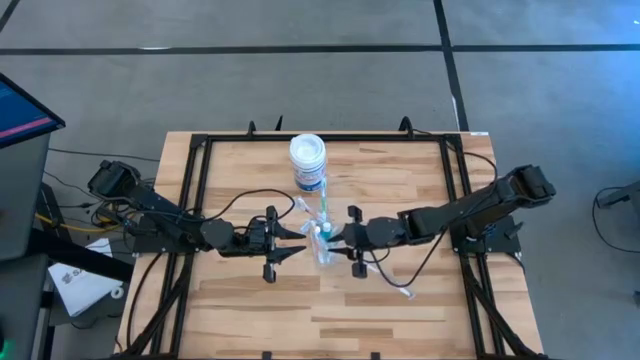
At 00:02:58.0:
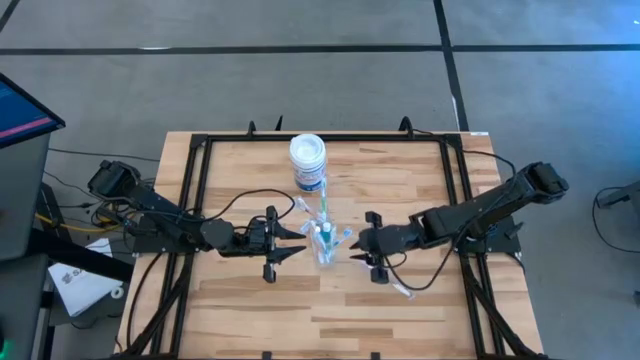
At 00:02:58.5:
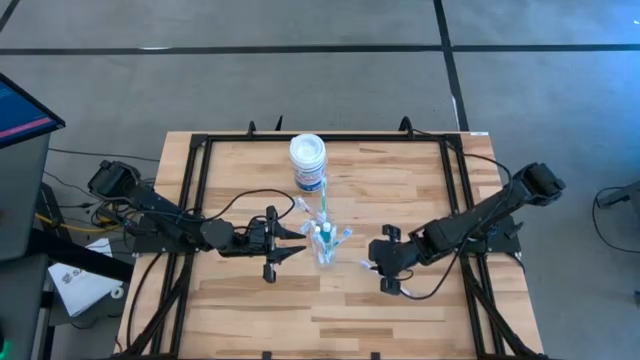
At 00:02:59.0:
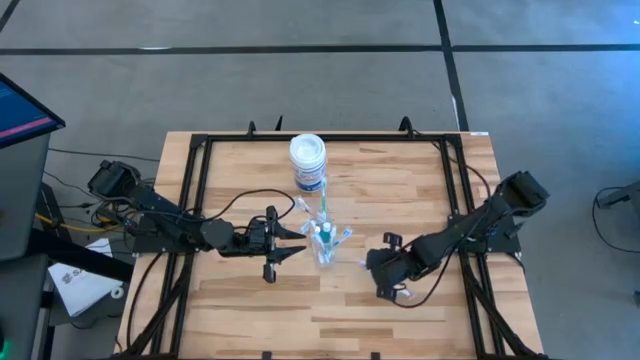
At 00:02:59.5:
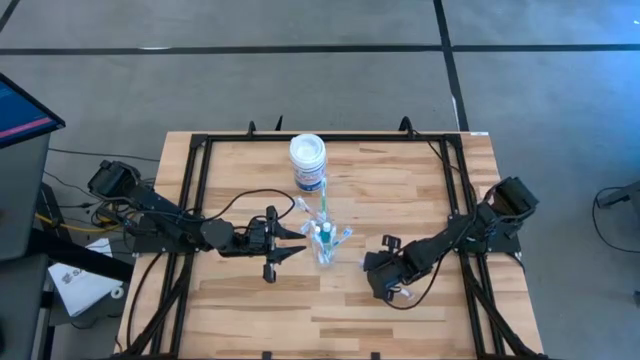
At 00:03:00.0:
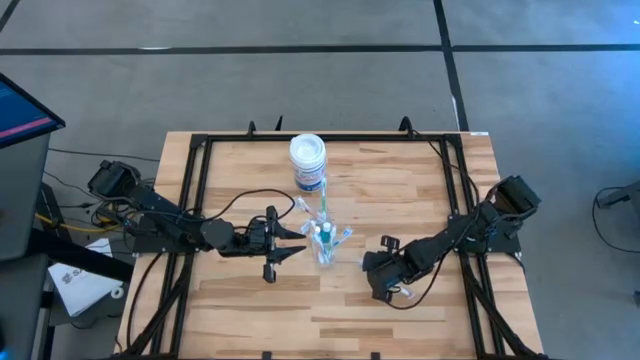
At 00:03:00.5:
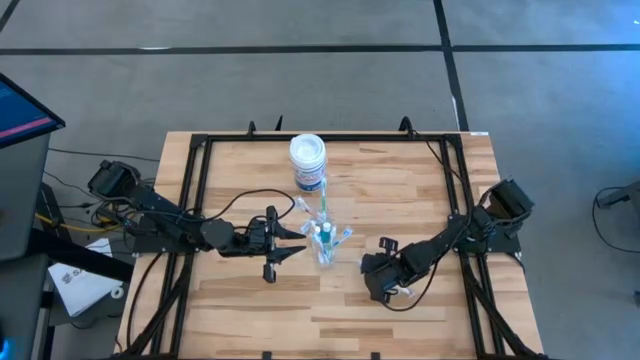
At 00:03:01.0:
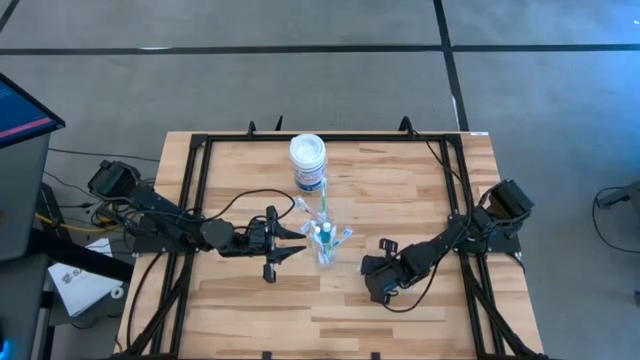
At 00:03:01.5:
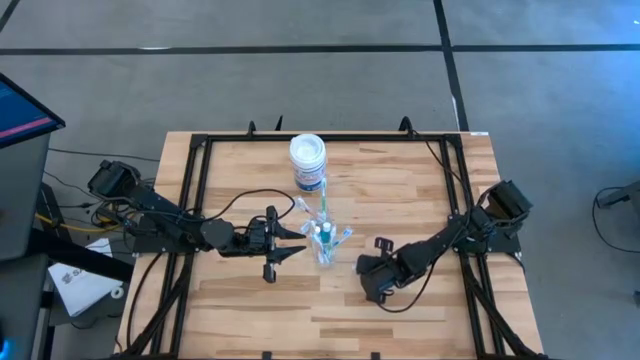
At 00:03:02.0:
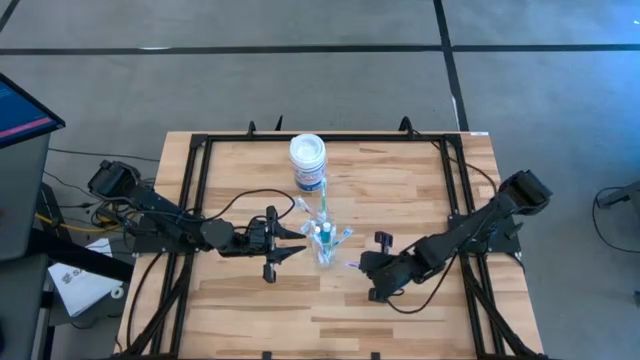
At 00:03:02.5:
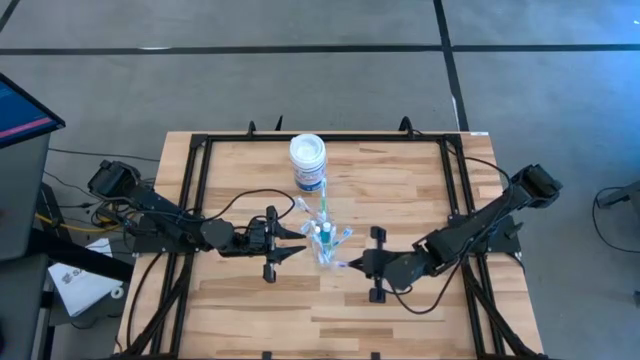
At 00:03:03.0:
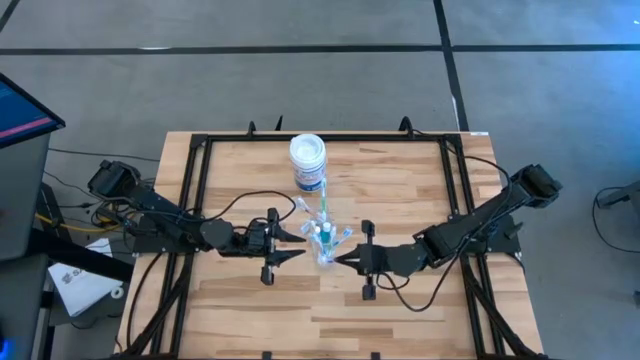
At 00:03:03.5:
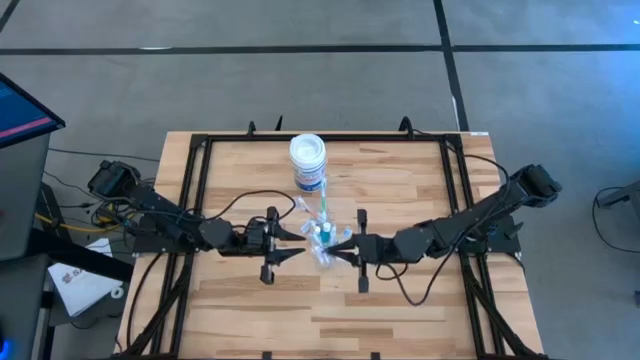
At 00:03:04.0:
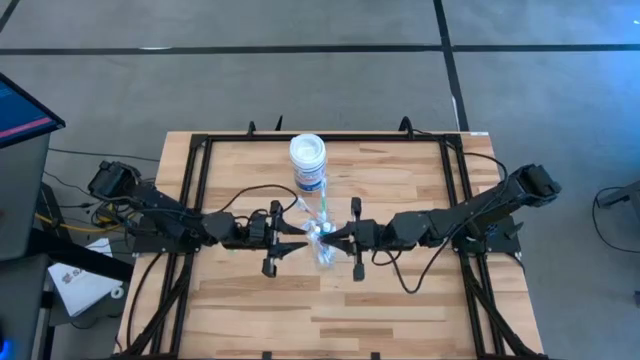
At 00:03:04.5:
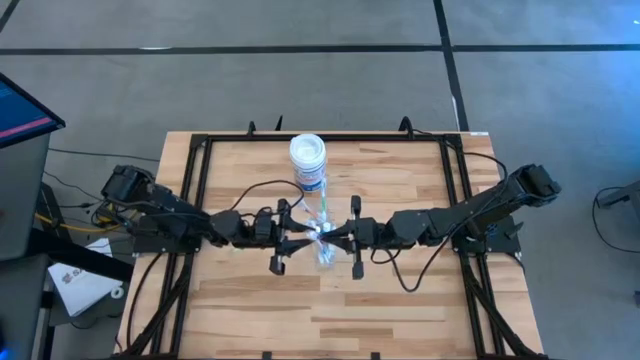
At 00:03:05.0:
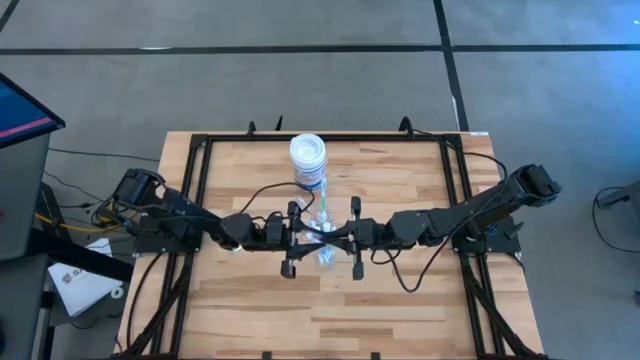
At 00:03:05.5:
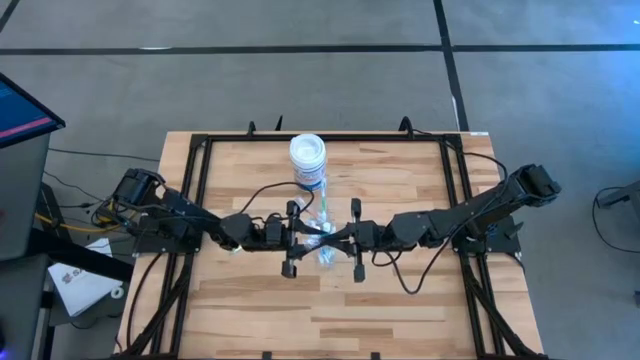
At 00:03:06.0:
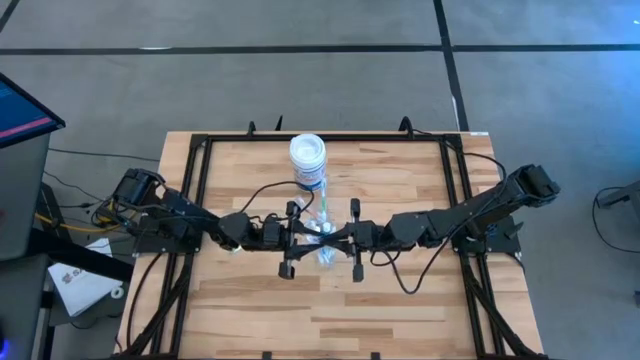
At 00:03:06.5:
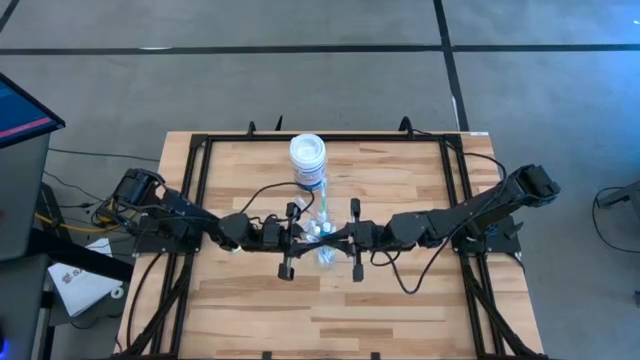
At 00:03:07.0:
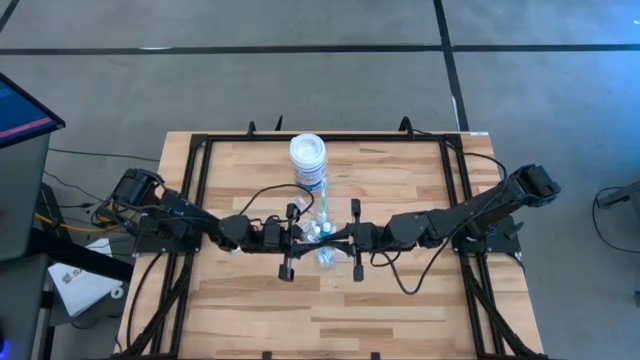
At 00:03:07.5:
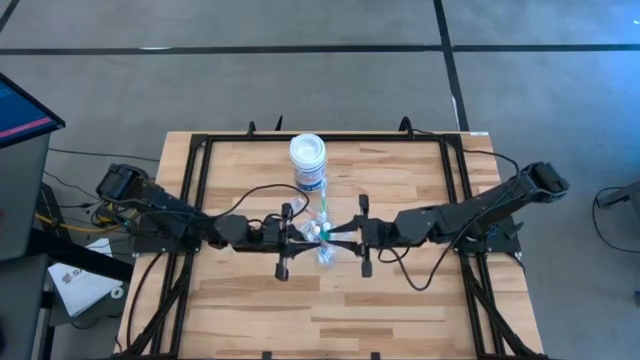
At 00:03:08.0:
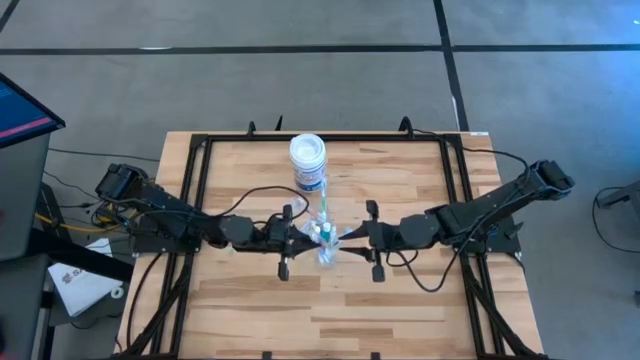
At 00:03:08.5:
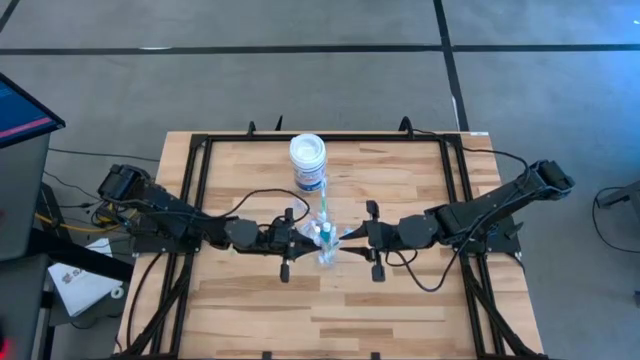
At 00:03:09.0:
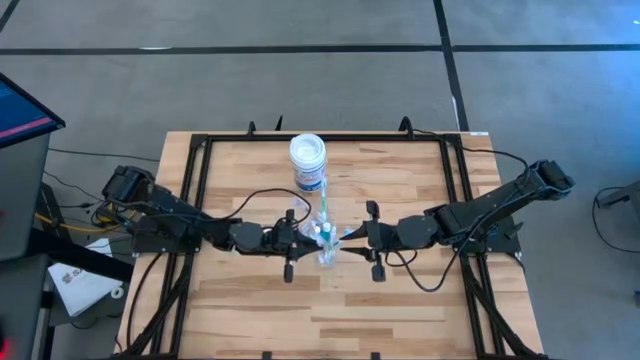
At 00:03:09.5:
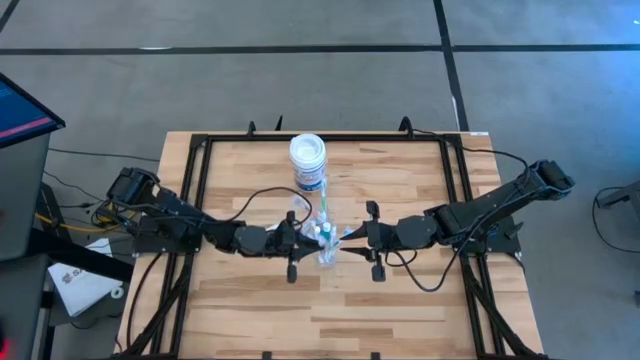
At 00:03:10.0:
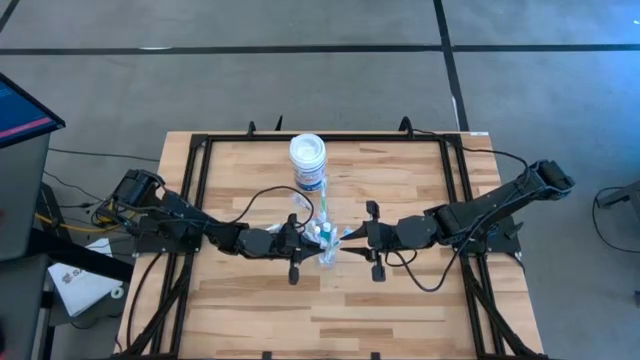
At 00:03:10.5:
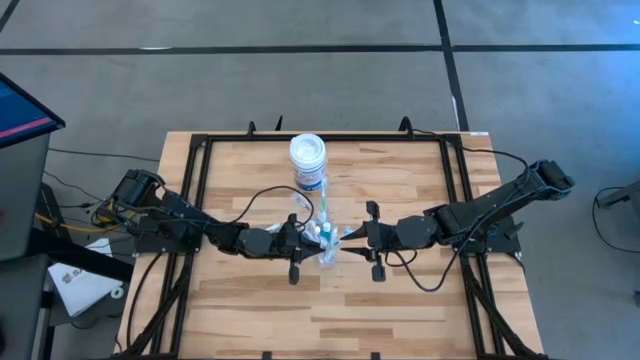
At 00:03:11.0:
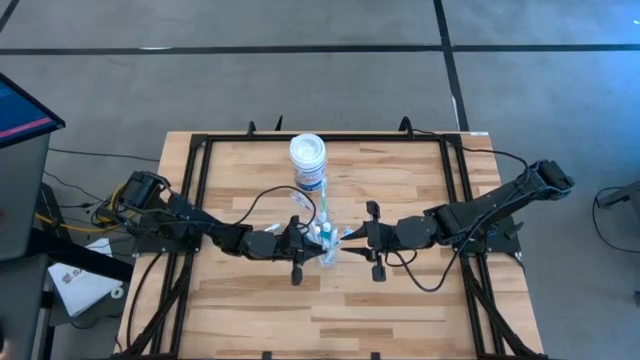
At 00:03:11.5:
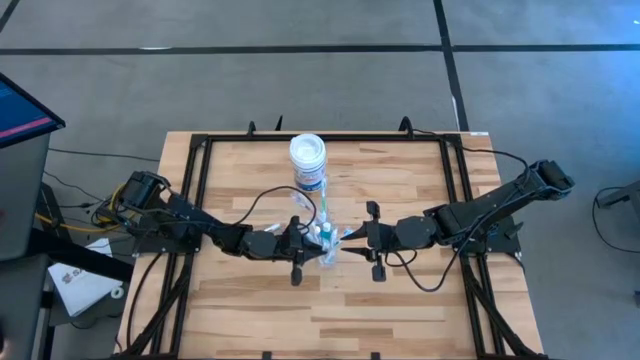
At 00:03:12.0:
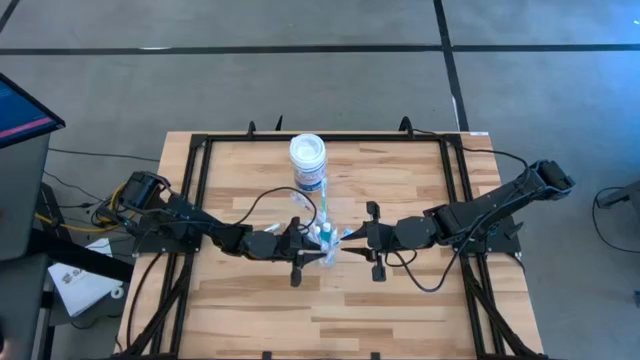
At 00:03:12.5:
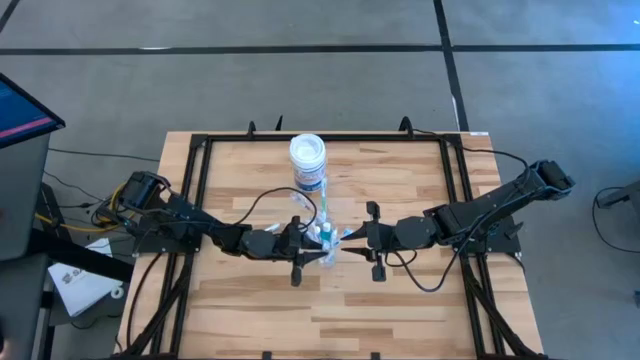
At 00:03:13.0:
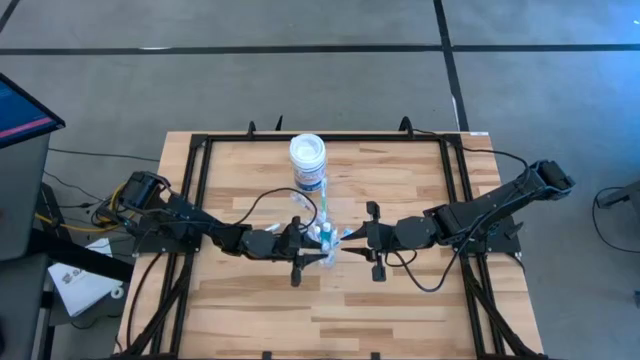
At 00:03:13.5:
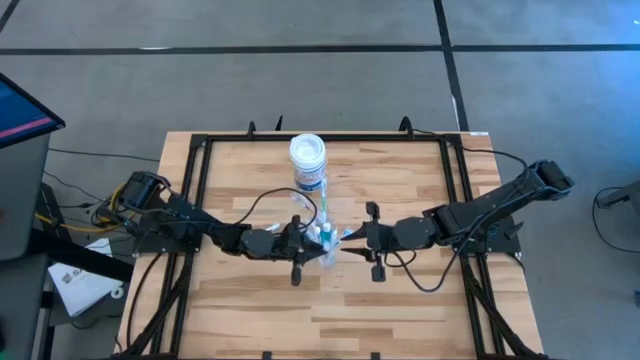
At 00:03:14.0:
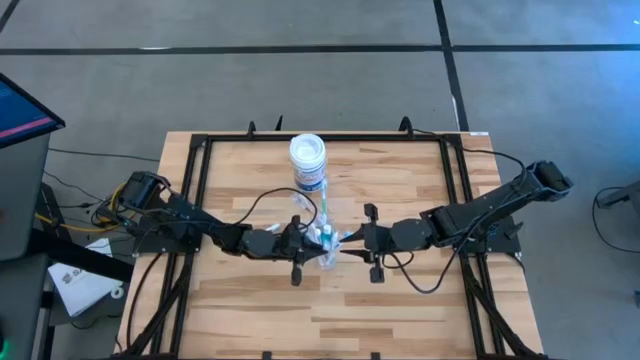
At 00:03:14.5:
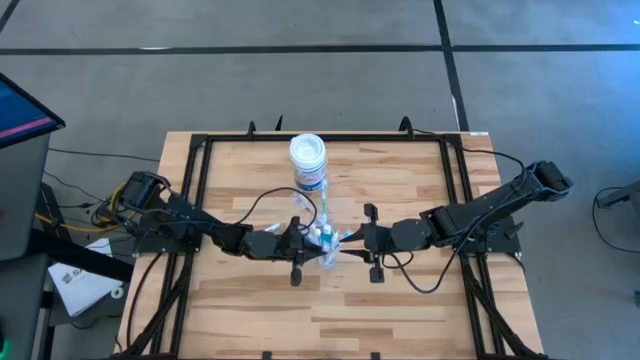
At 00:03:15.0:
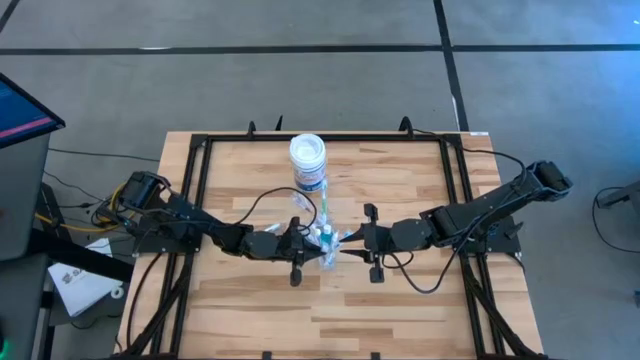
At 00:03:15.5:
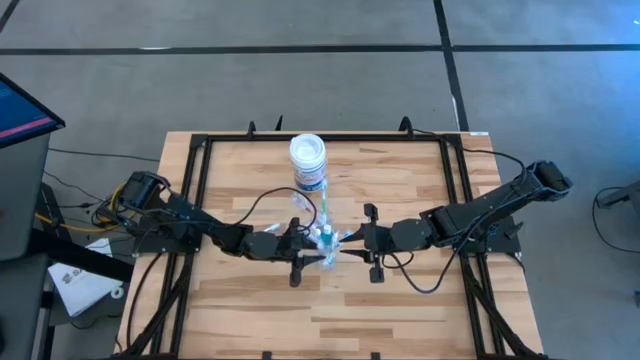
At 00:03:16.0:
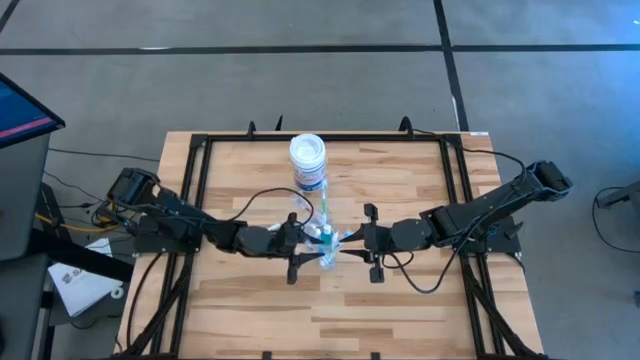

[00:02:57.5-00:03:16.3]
Task: Pick & Place toothbrushing station
Put the purple toothbrush into the Transparent organizer
